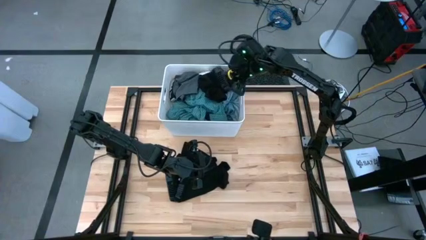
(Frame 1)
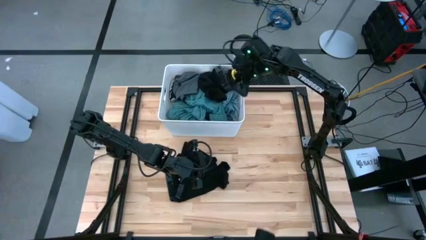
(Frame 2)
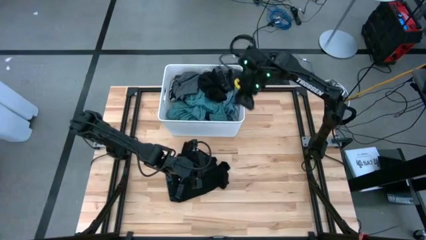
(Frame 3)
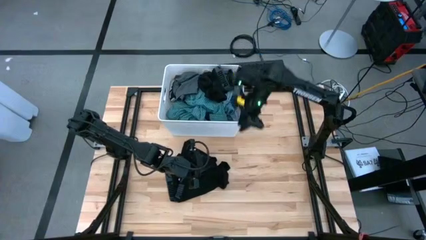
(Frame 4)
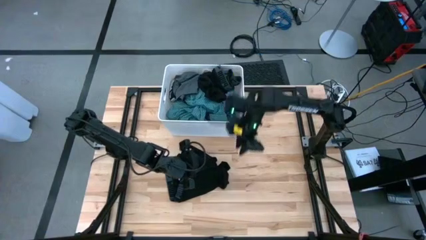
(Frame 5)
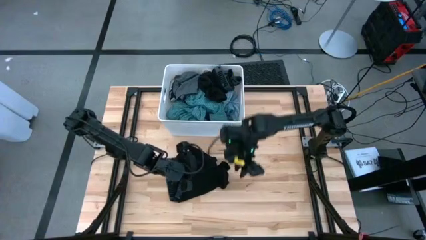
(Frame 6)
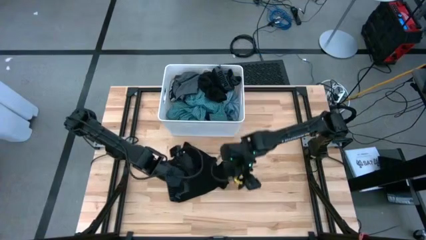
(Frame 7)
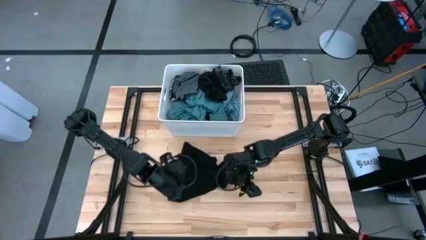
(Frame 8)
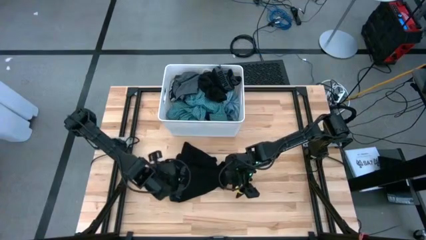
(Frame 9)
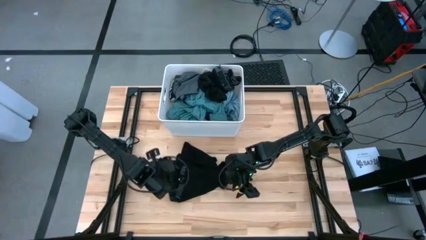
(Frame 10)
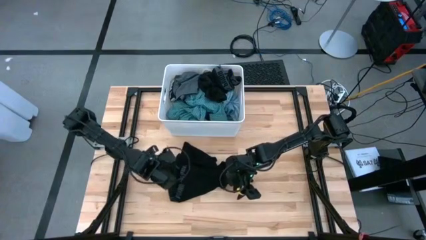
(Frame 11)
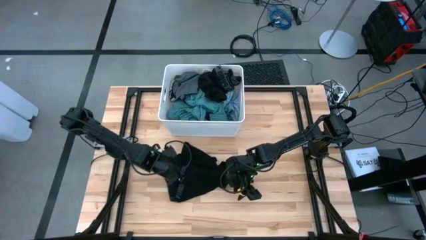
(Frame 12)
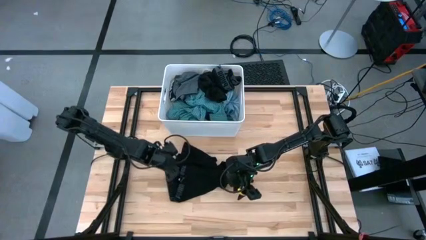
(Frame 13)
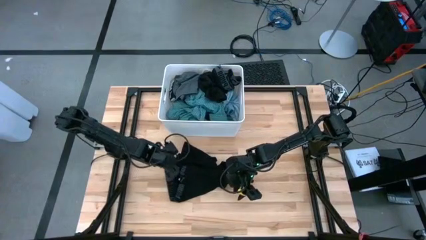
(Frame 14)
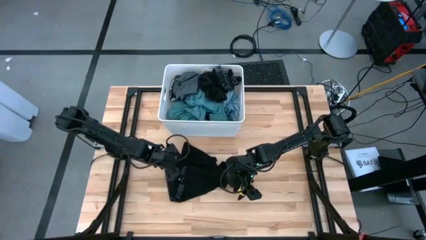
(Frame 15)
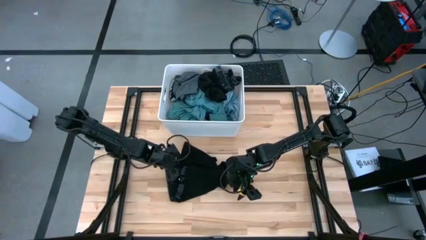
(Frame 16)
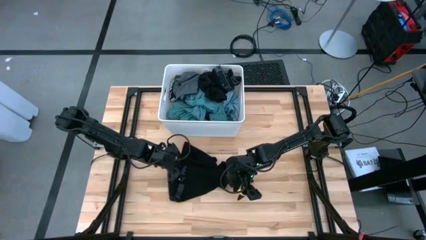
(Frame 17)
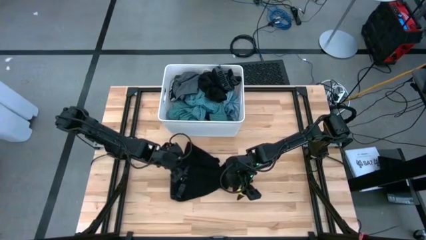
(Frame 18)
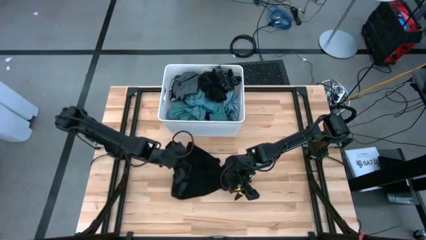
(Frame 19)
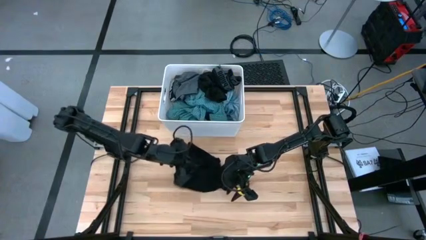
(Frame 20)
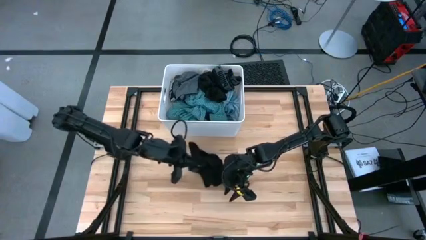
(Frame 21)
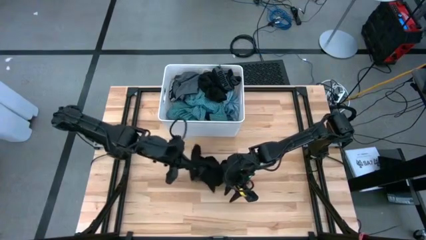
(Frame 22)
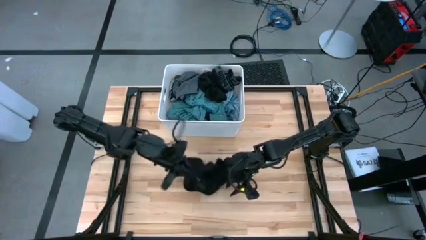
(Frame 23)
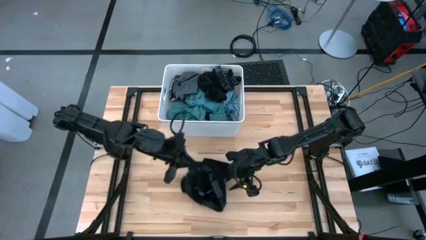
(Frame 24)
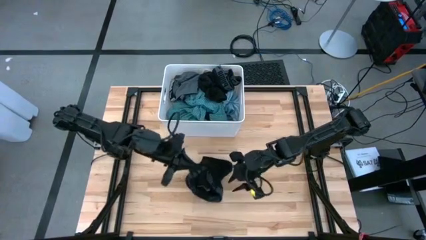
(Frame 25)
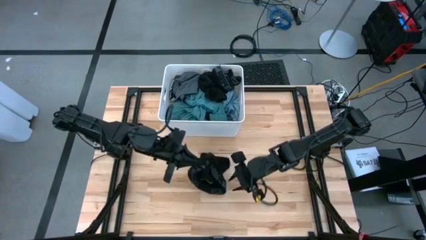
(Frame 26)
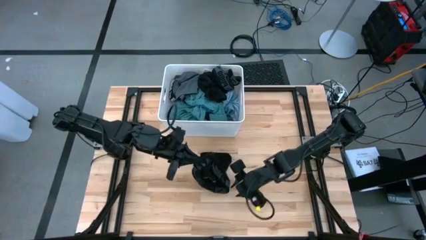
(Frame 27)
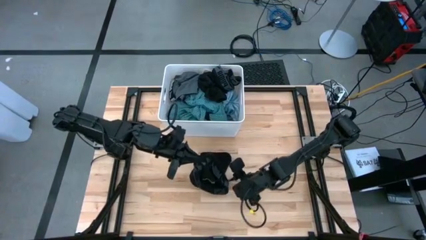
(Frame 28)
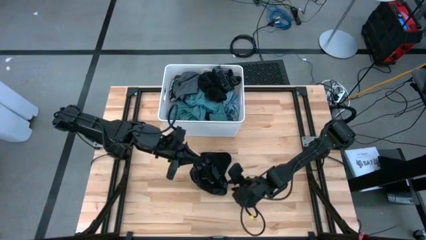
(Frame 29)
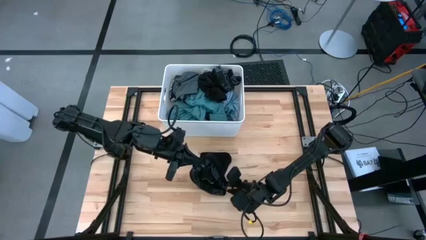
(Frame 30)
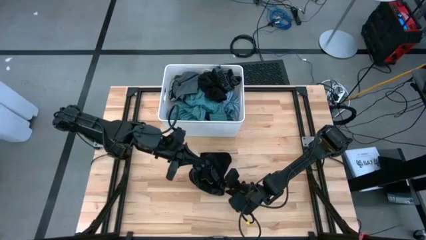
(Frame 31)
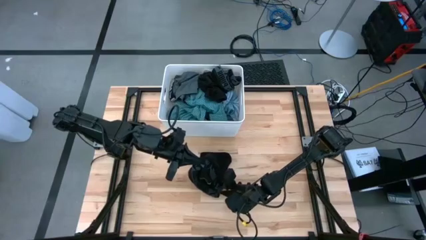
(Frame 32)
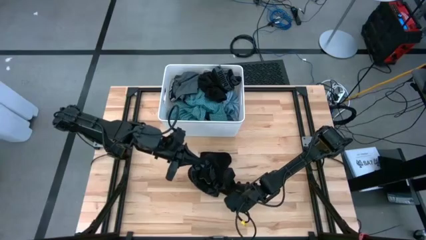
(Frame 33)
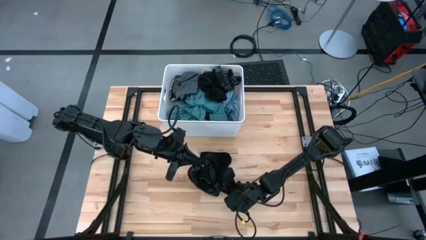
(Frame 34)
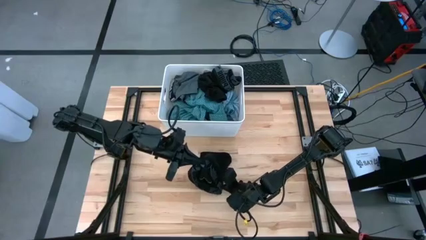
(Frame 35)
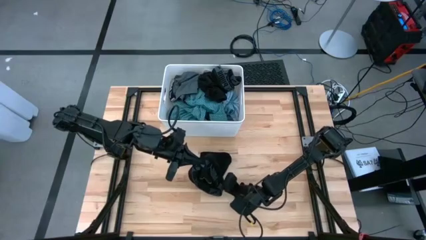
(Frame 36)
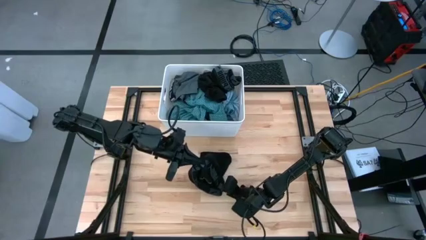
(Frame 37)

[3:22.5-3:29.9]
Task: Sort clothes
Put the black underwear into the white bin

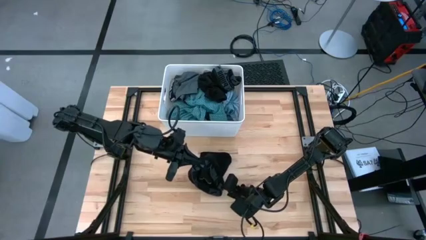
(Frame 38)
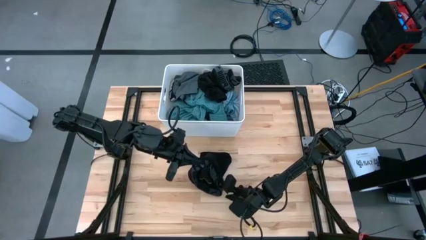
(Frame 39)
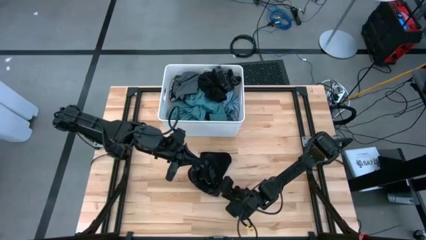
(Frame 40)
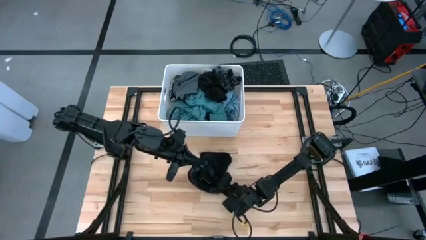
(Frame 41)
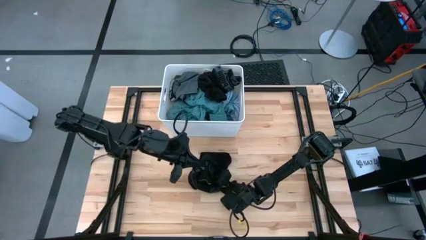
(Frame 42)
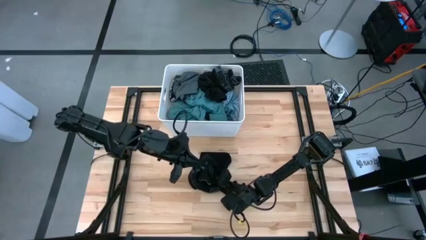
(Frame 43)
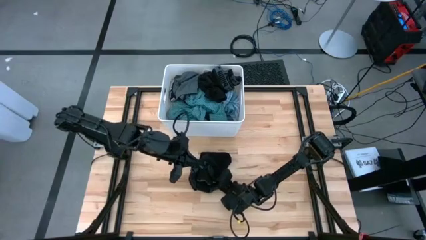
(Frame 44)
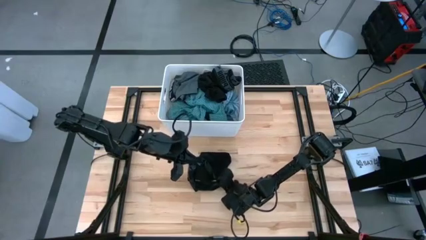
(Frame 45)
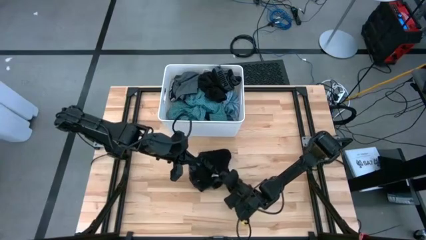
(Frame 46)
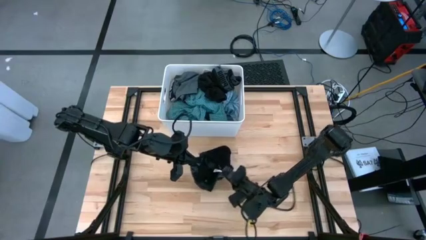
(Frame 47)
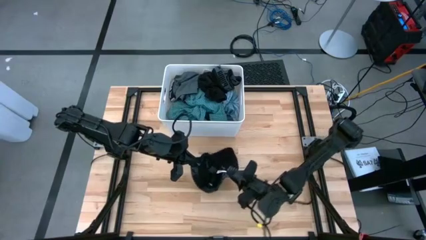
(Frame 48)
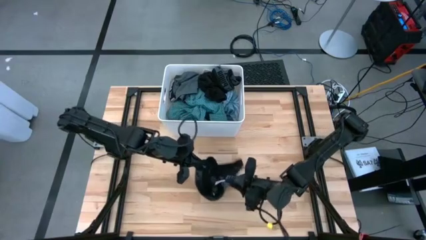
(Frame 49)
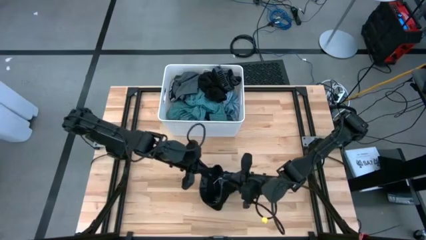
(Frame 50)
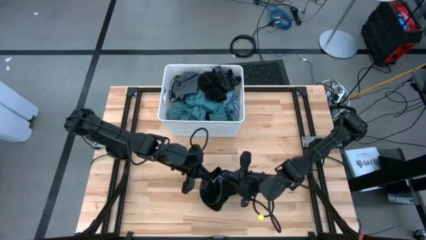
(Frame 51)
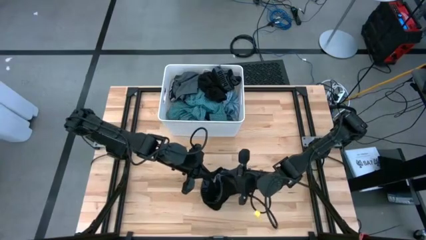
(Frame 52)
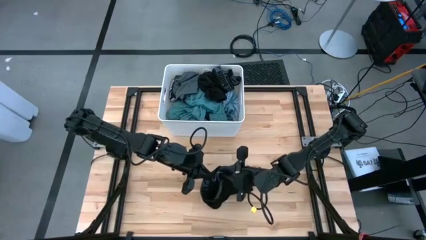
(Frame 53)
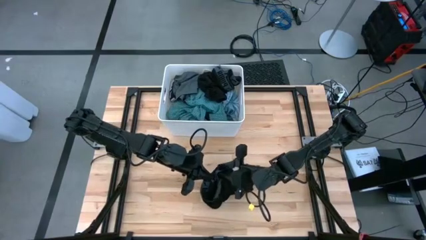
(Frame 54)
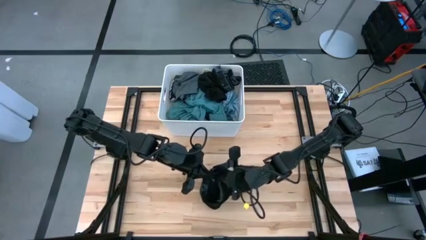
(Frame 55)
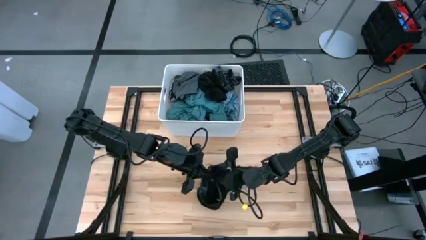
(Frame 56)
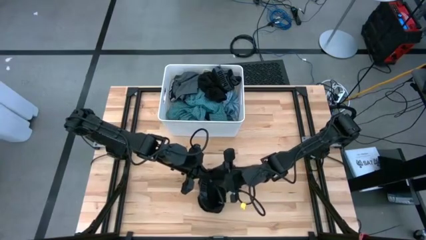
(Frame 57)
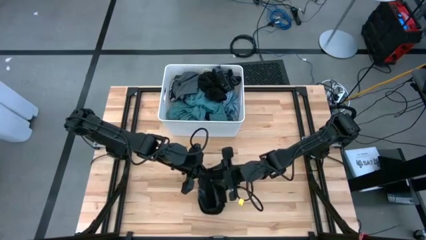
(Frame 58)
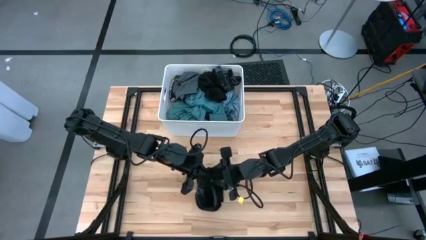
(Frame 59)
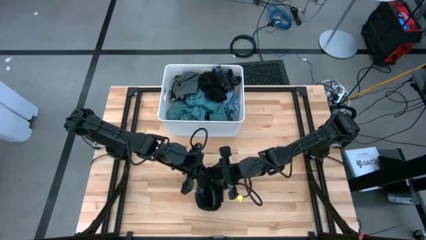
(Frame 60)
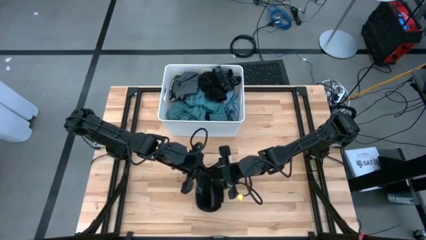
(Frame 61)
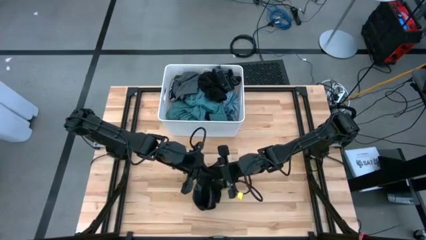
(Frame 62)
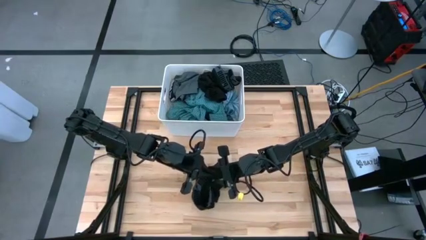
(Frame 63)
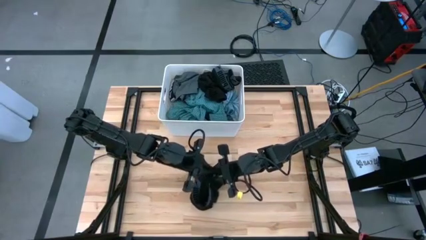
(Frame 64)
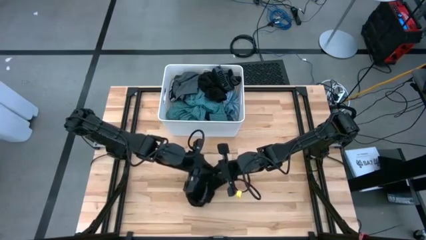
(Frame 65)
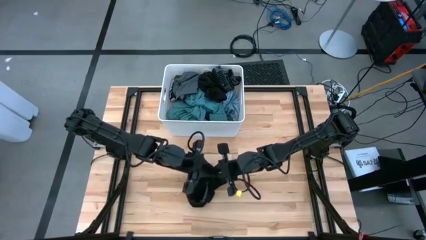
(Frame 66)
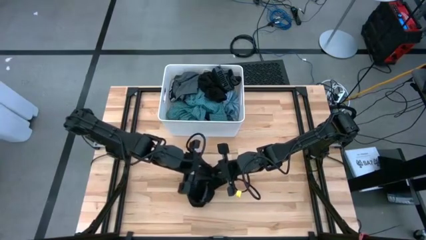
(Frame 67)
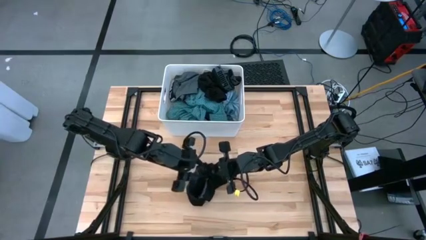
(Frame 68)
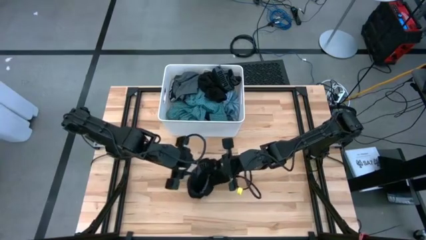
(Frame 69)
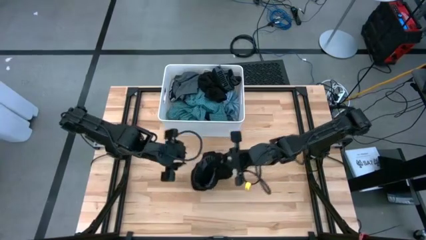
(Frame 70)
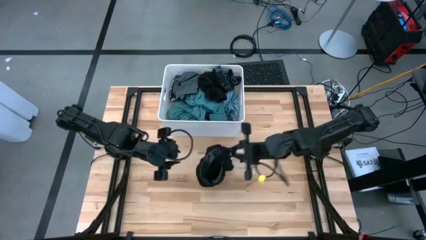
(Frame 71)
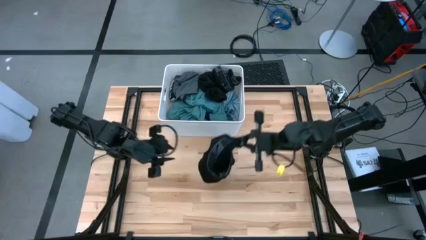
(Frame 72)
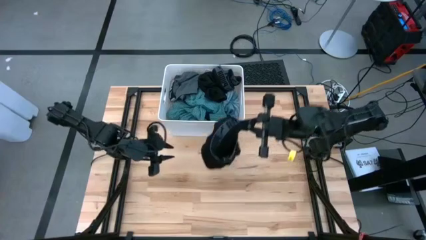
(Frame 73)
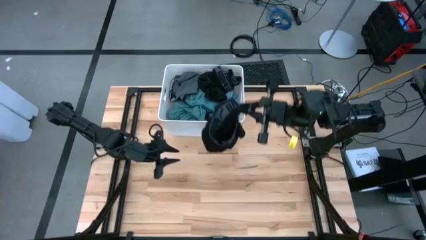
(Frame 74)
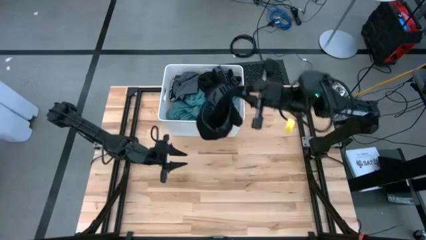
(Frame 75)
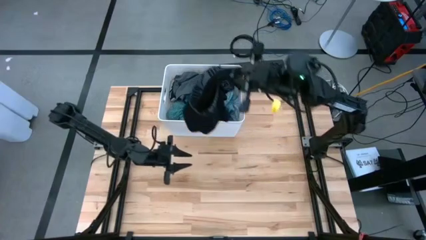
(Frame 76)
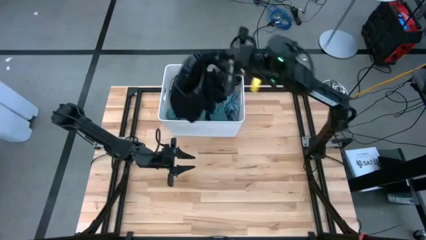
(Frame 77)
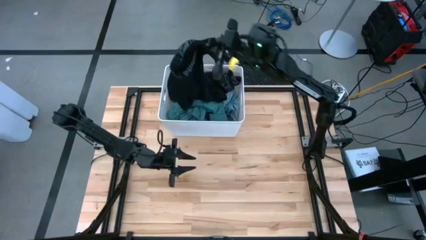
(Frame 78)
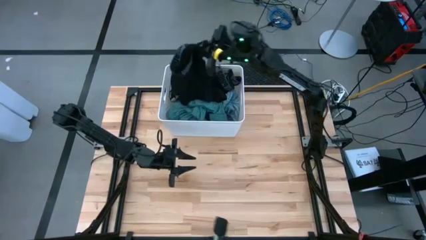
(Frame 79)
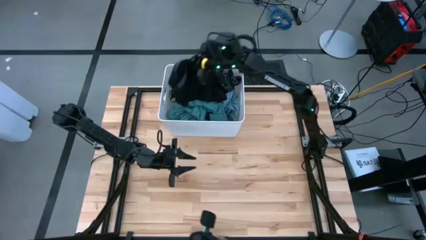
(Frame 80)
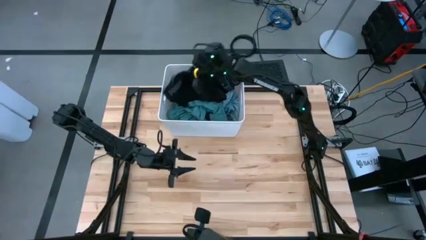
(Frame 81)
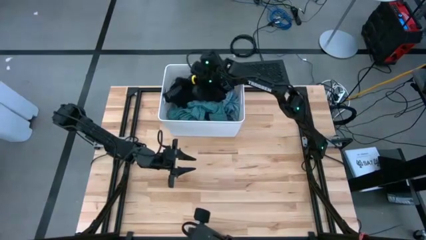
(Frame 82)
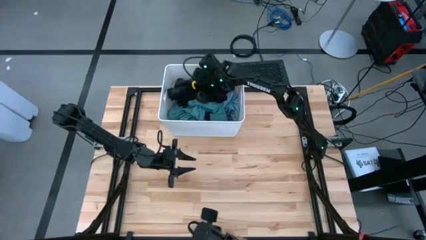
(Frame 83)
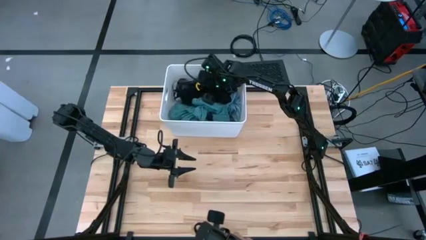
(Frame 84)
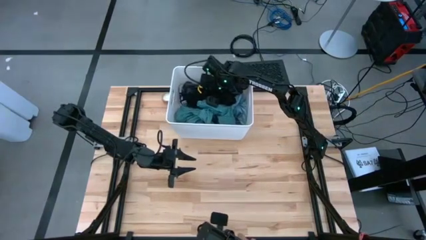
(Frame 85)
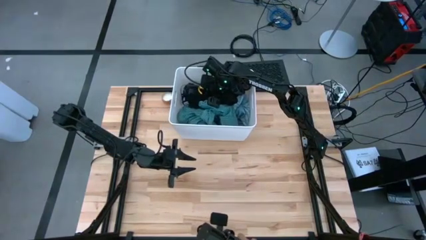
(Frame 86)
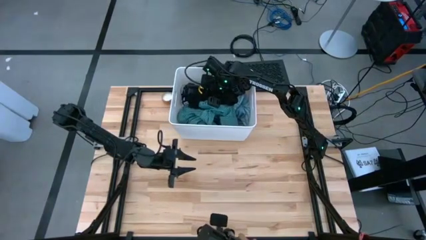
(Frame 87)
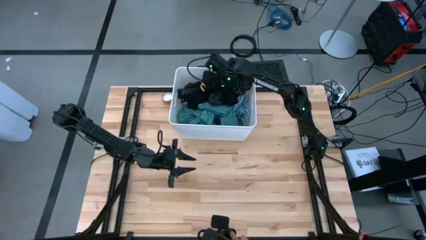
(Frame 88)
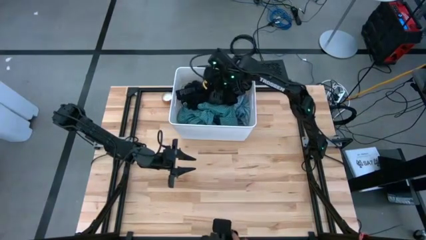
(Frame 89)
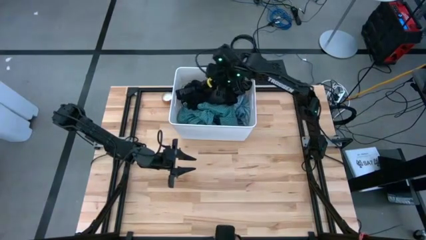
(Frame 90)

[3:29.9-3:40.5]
Put the black underwear into the white bin
